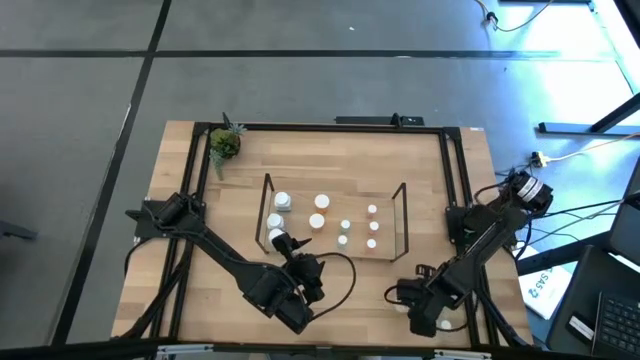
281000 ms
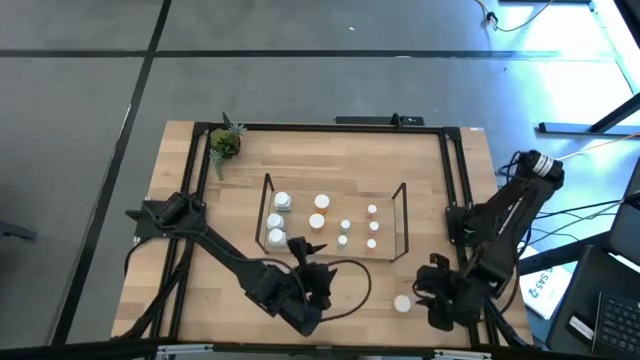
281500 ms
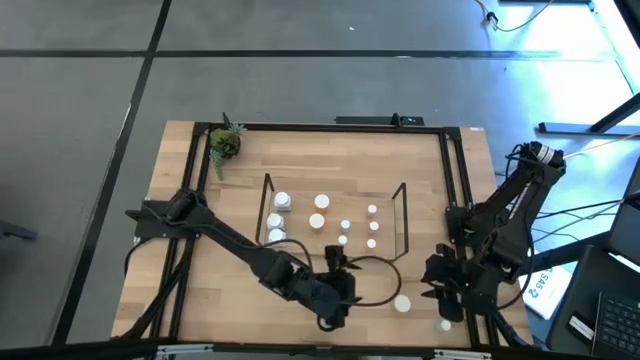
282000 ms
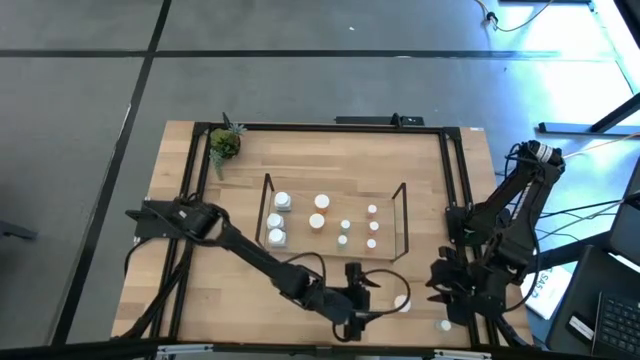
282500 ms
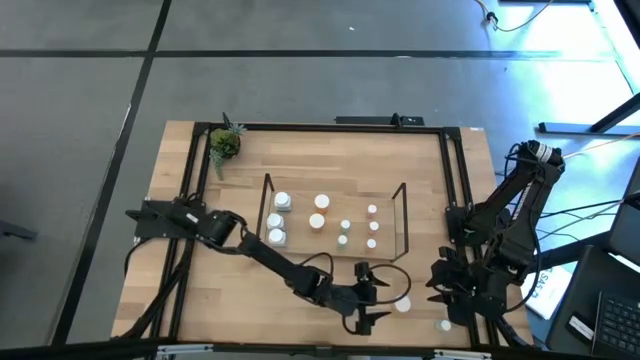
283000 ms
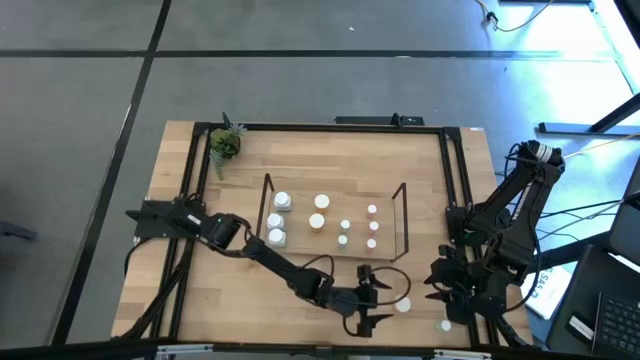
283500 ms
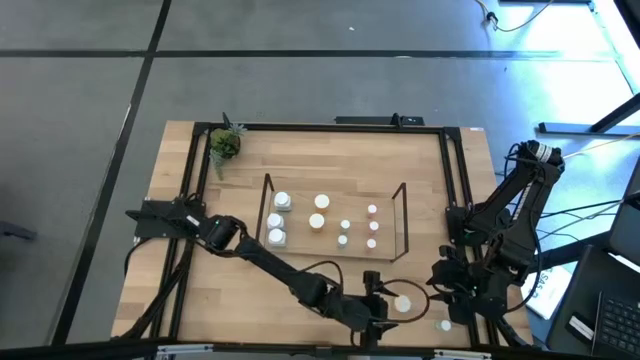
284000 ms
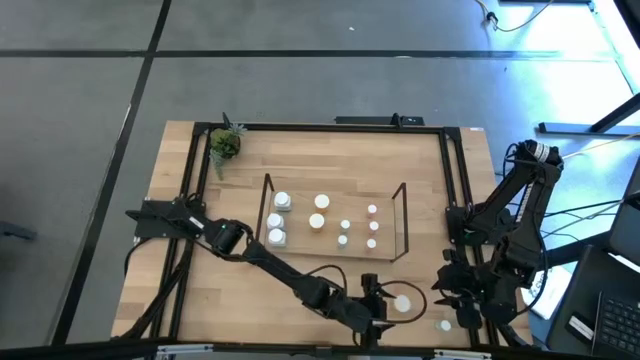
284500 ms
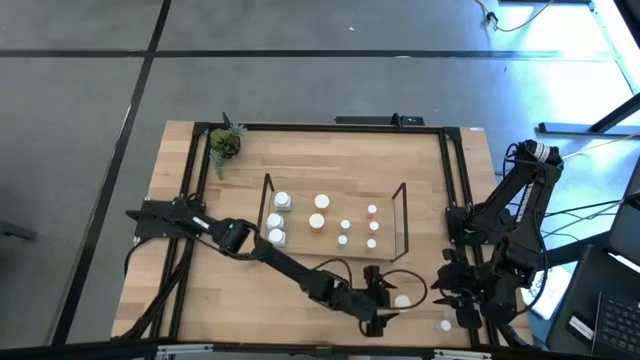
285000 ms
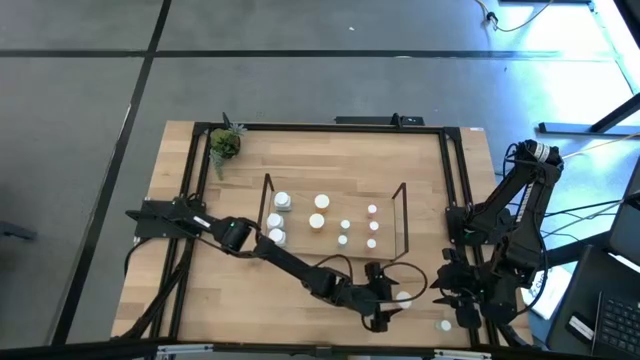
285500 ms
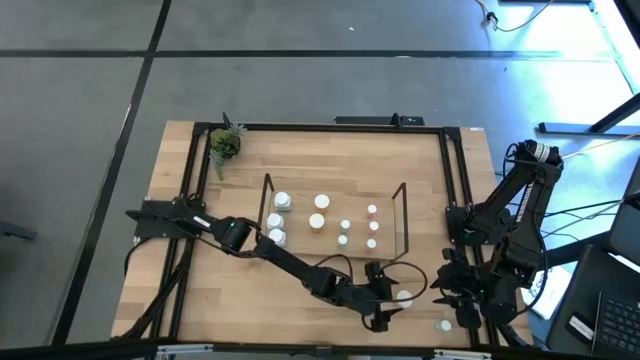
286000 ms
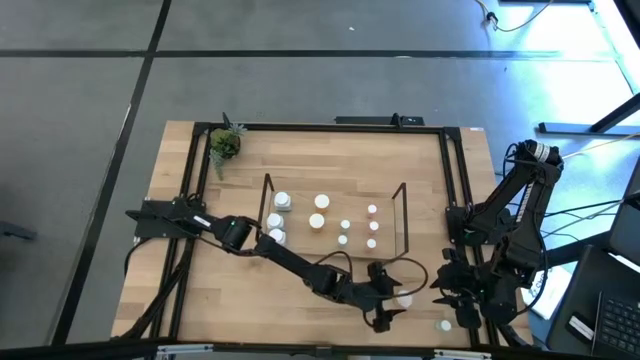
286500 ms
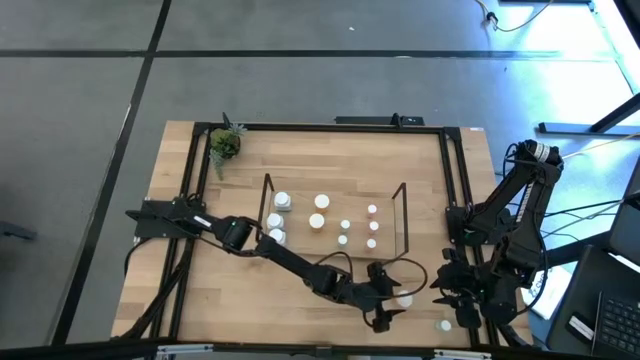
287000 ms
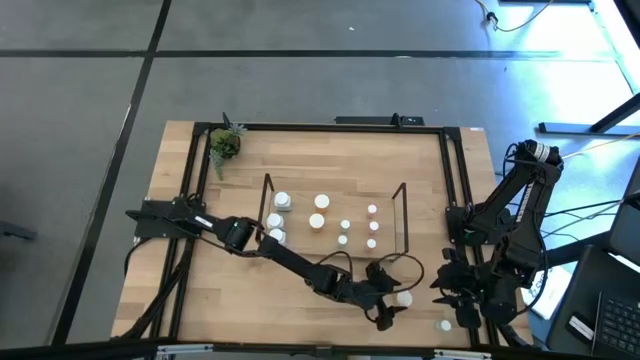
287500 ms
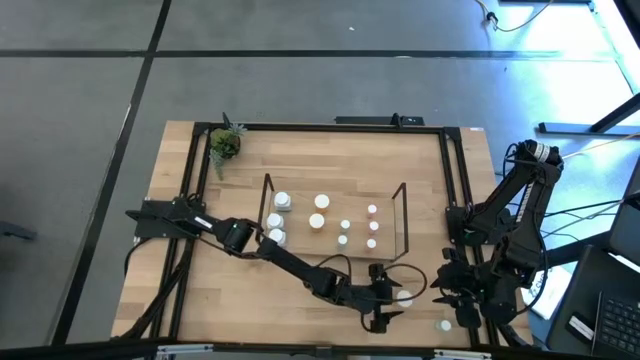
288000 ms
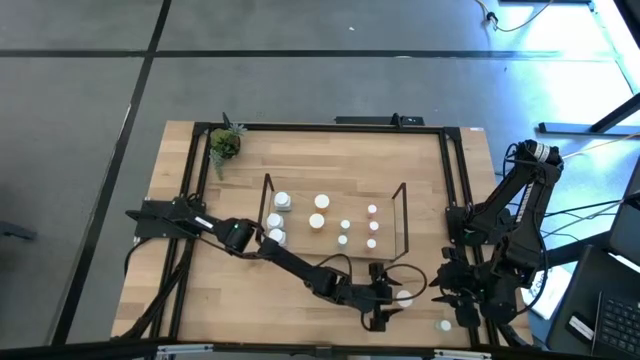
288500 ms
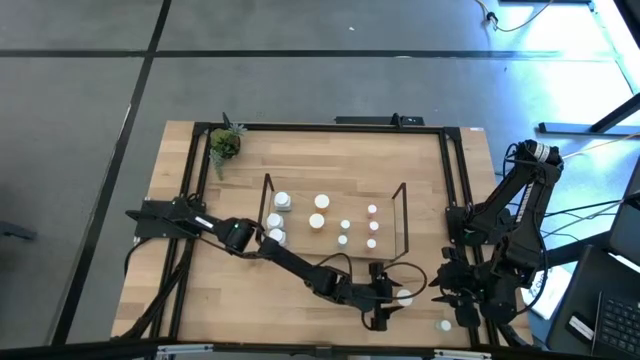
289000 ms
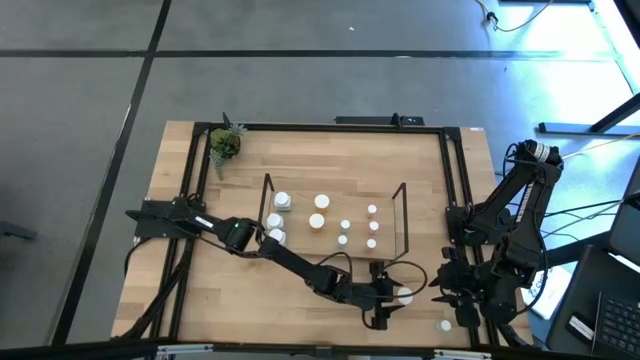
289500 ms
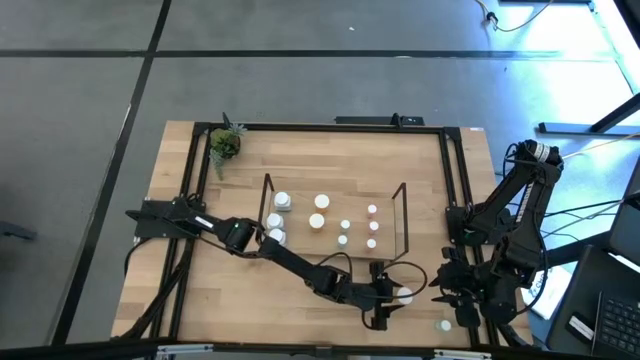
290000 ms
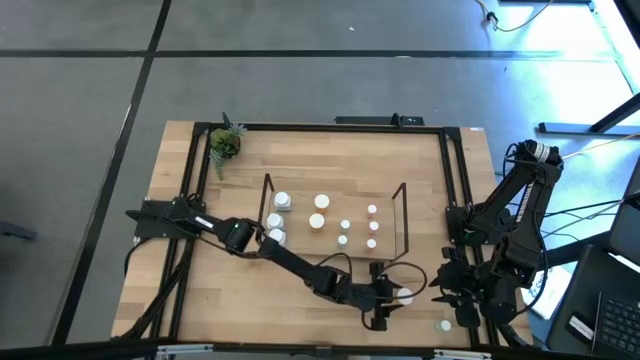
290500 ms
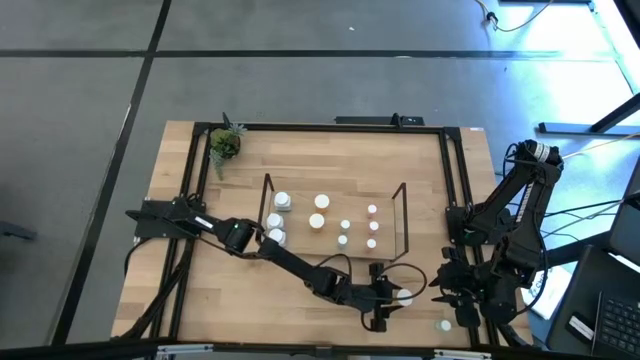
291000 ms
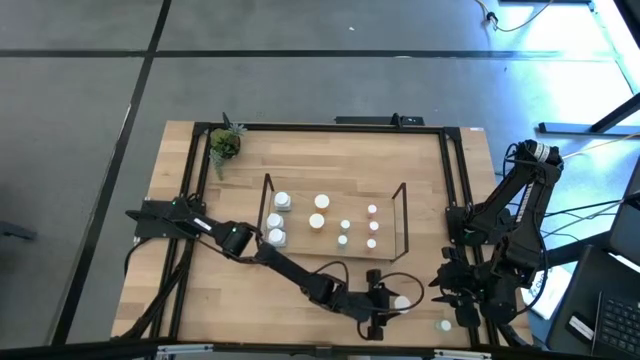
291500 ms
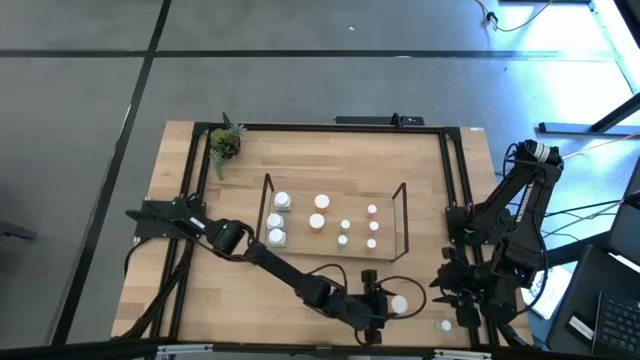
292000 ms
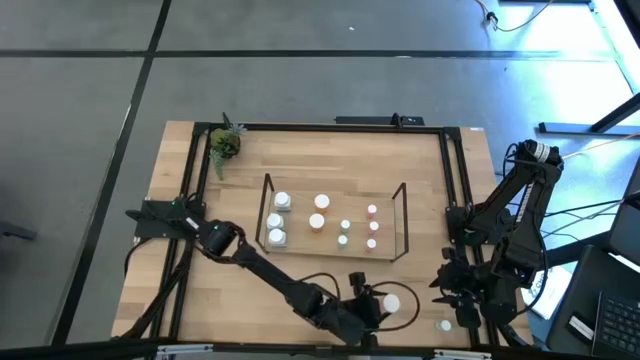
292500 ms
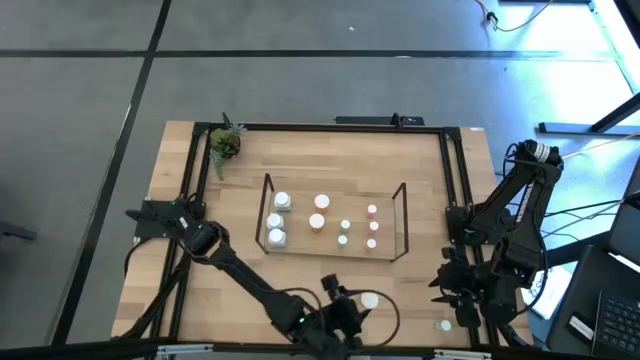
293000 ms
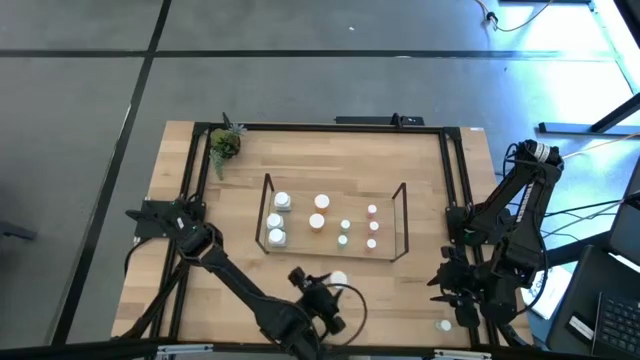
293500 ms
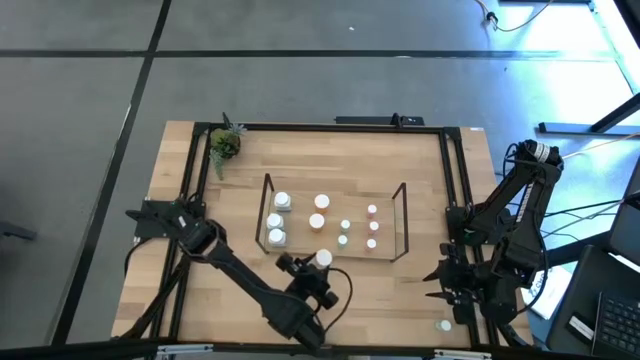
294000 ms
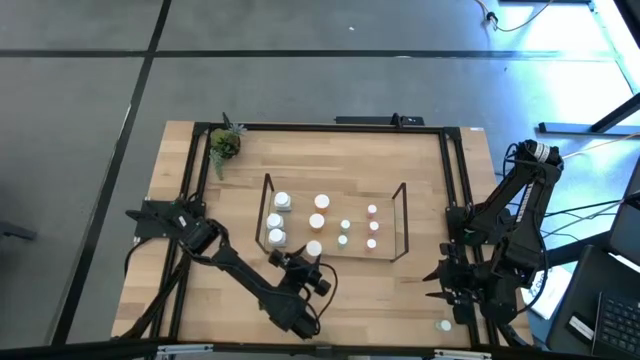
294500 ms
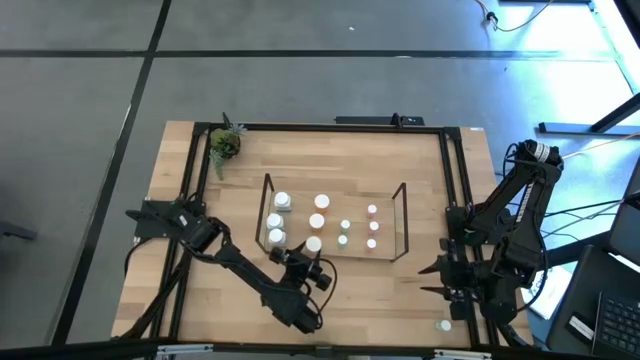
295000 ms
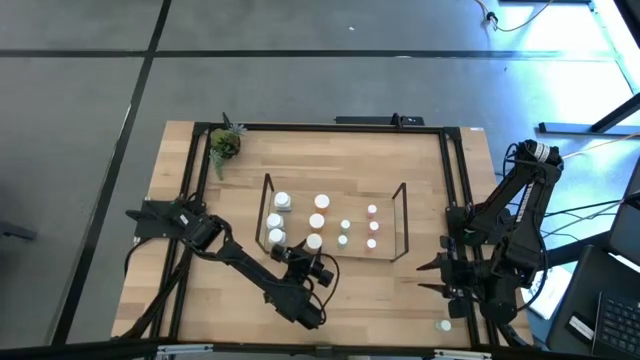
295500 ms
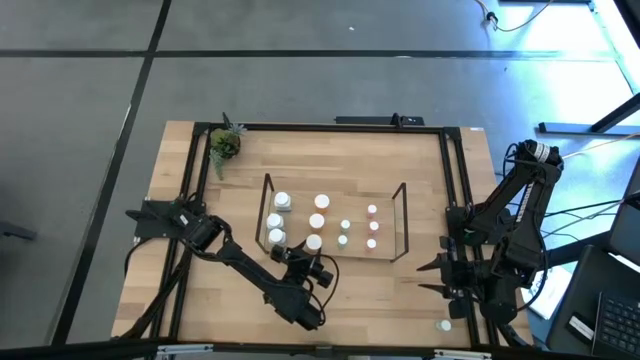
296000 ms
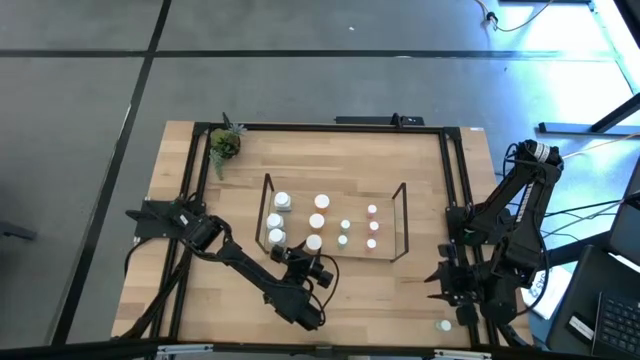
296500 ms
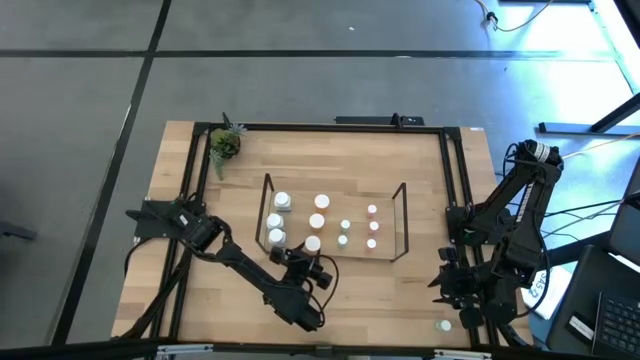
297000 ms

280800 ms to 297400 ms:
Task: Pick and place medicine bottles onto shelf by color
Put the orange pill bottle on the shelf aligned with the other orange pill bottle

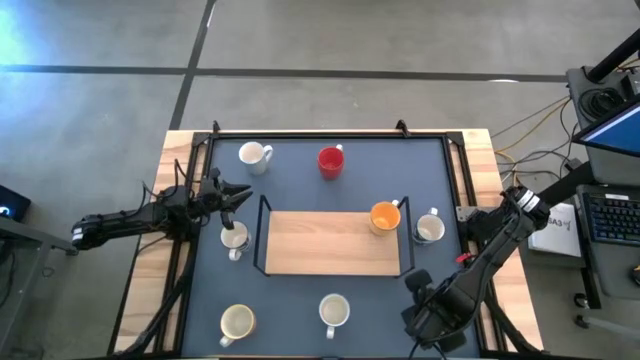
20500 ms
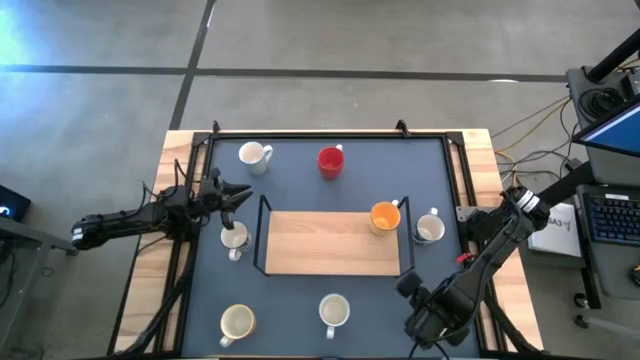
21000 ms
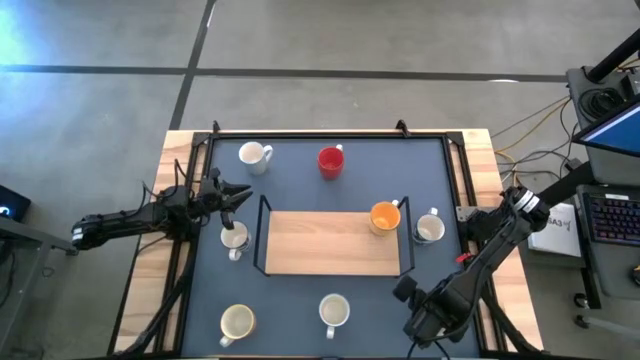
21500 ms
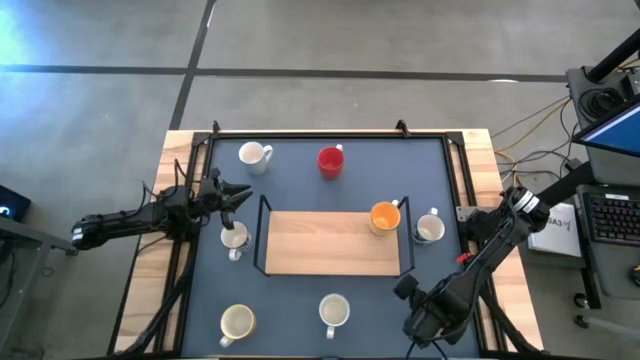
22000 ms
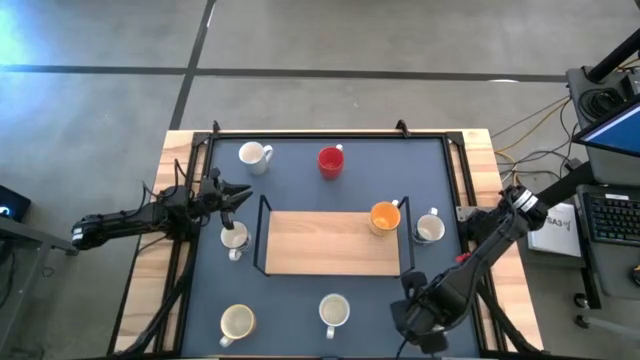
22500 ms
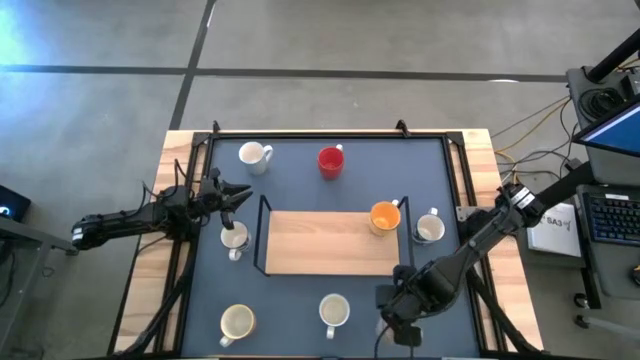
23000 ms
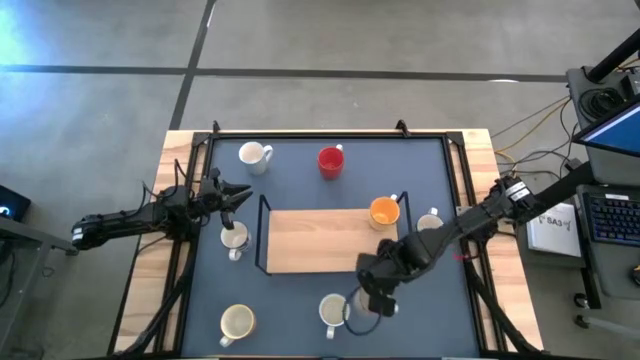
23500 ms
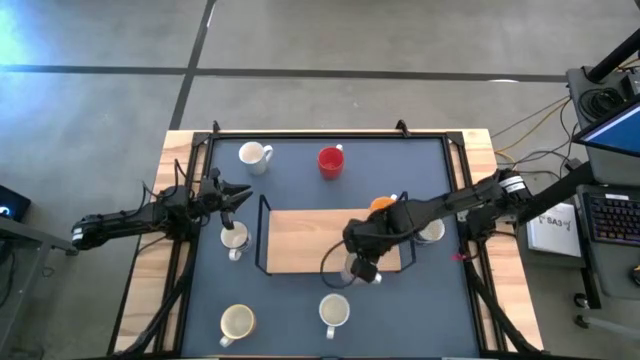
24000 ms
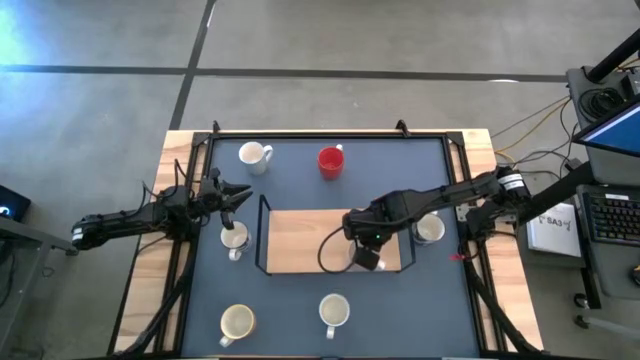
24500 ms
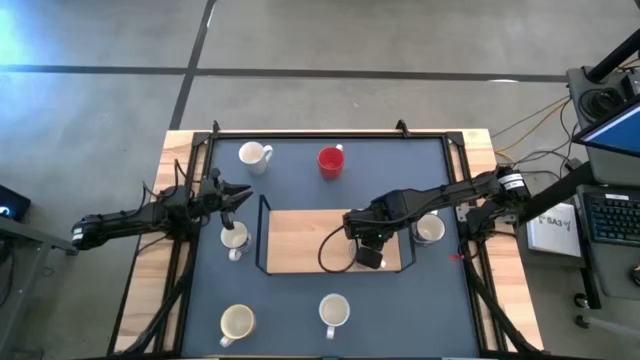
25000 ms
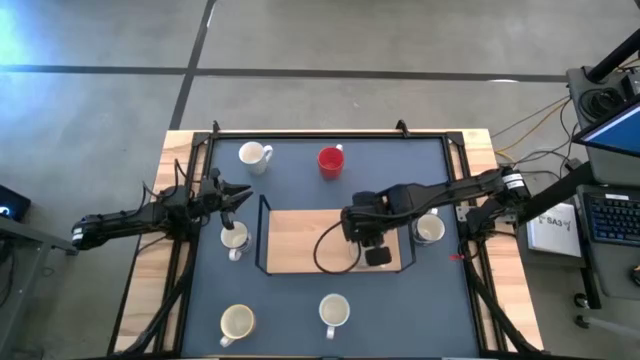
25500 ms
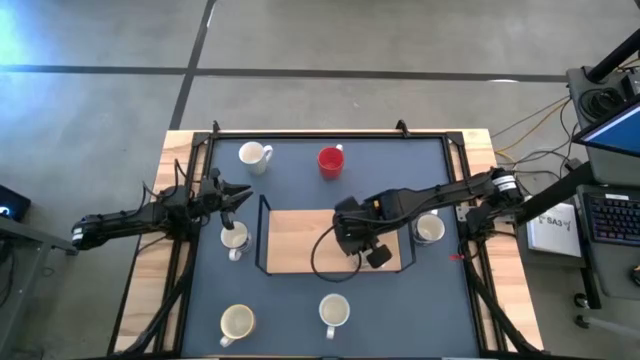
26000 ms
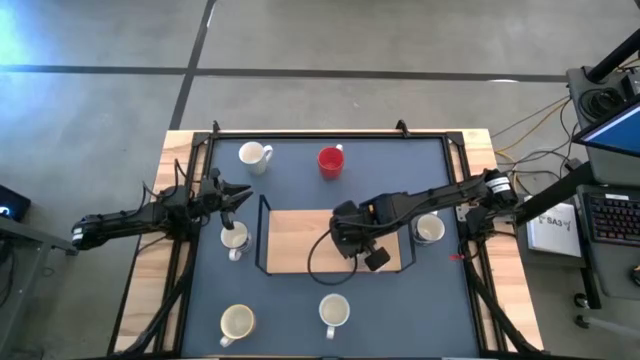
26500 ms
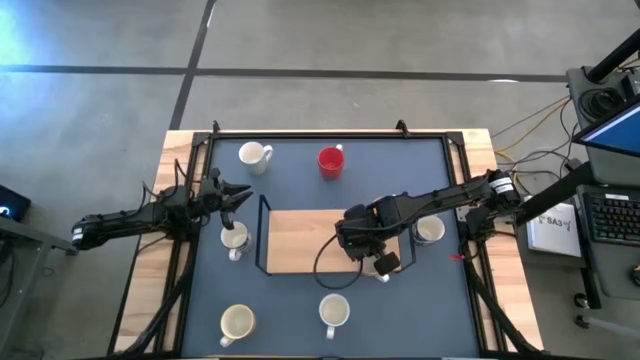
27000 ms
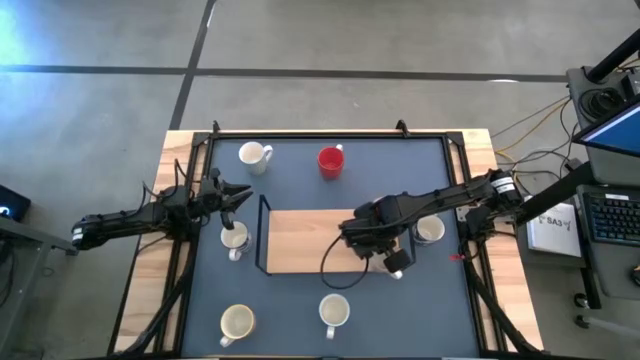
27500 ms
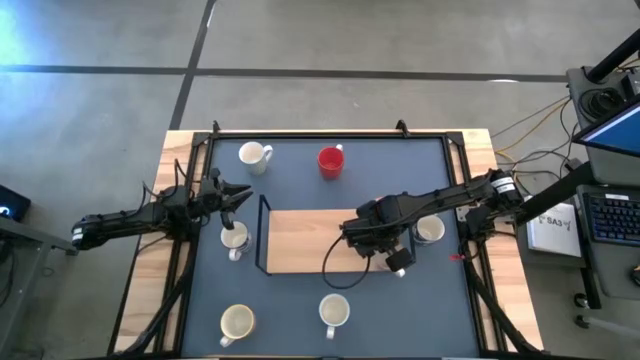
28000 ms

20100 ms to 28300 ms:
Task: Place coffee mugs
Put the gray cup on the shelf aligned with the other yellow cup
